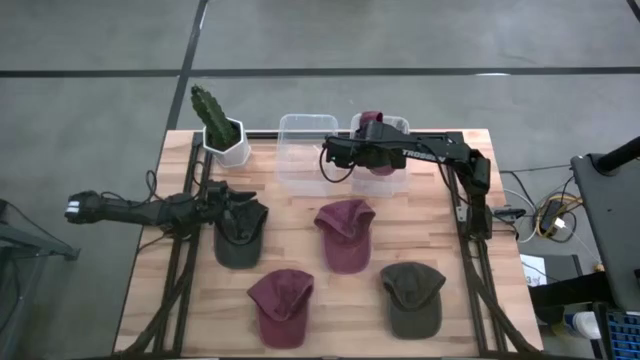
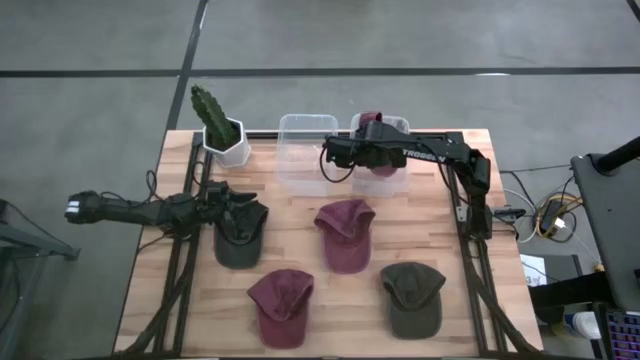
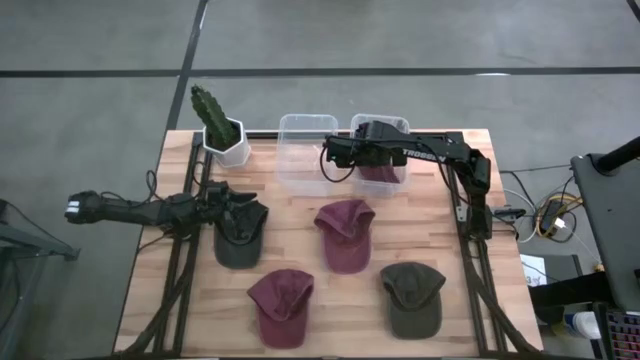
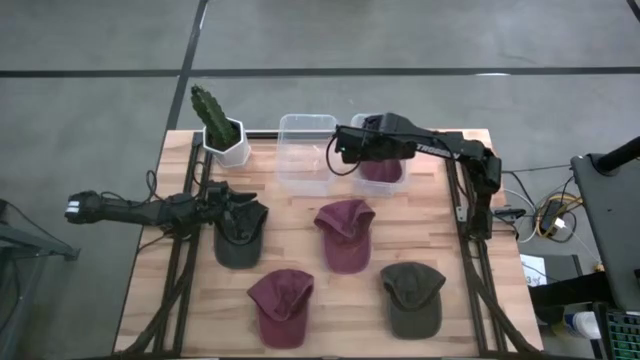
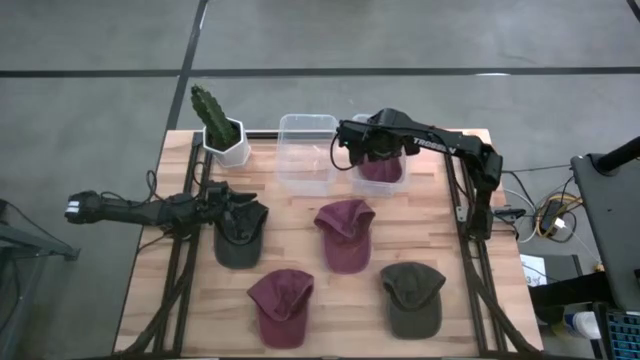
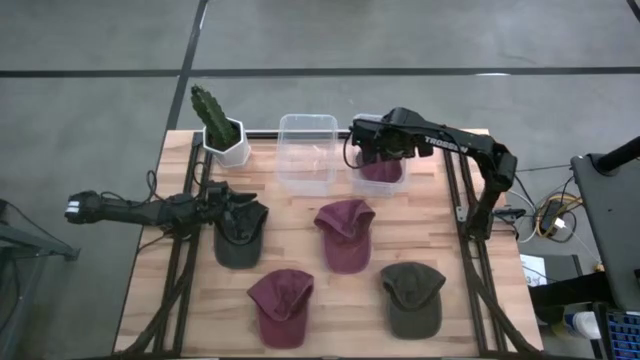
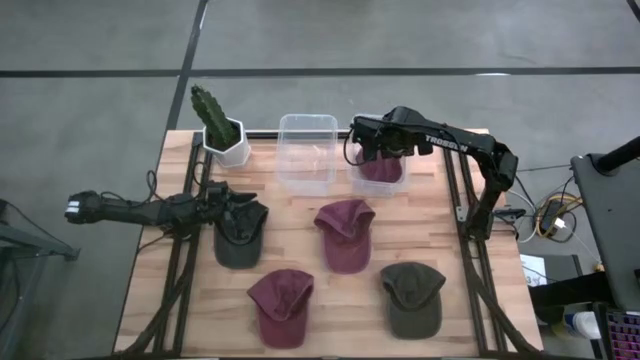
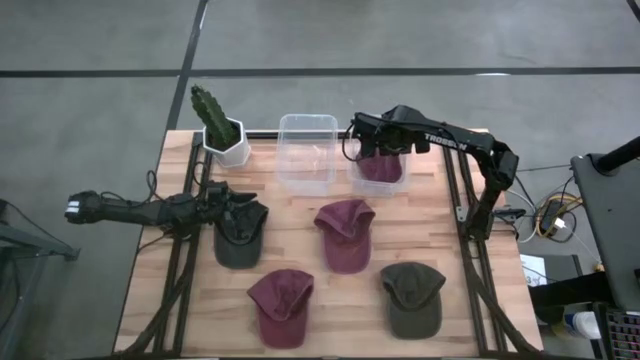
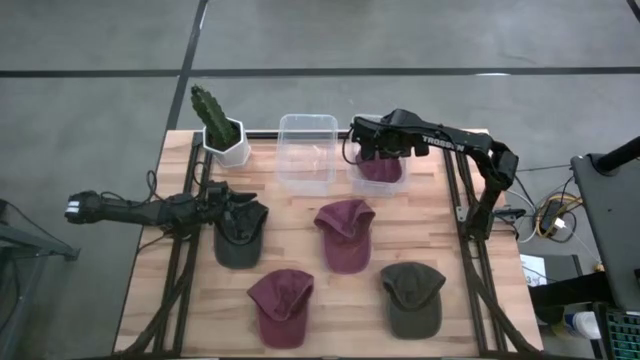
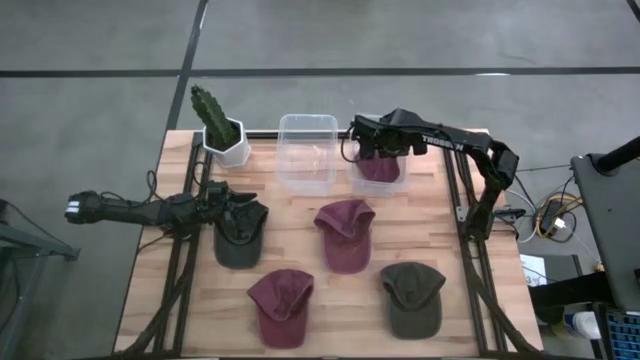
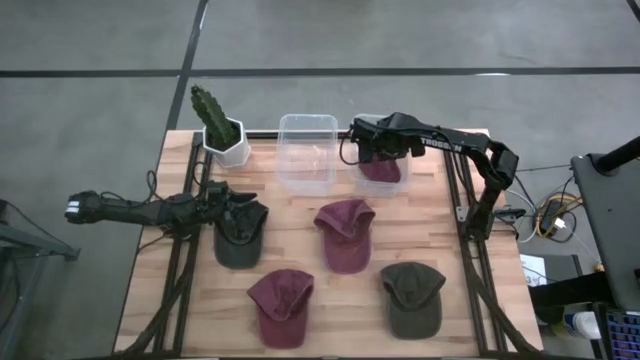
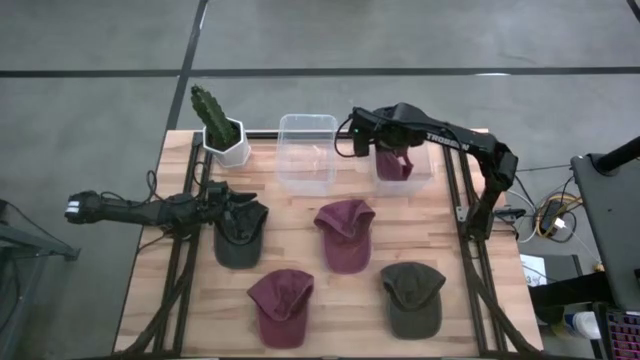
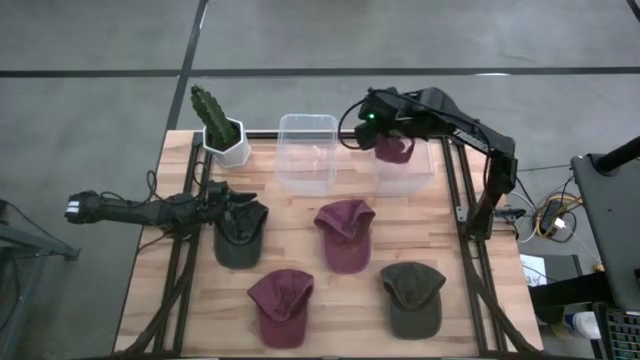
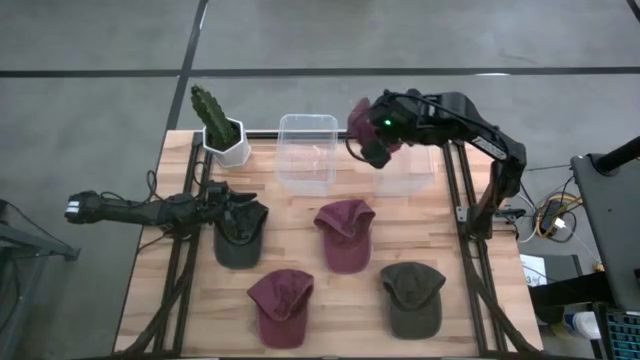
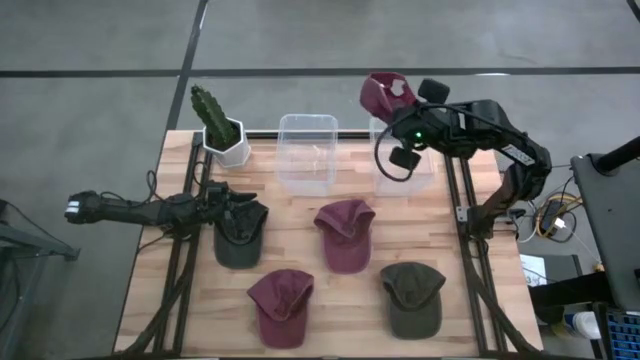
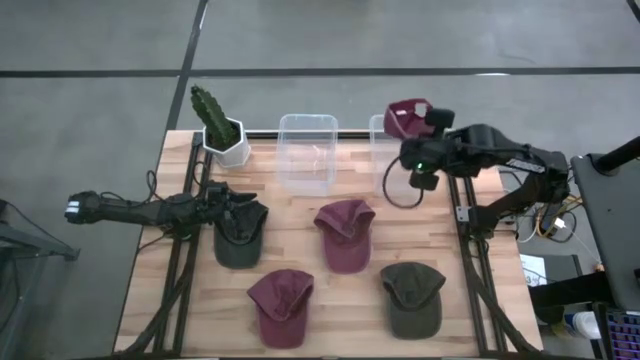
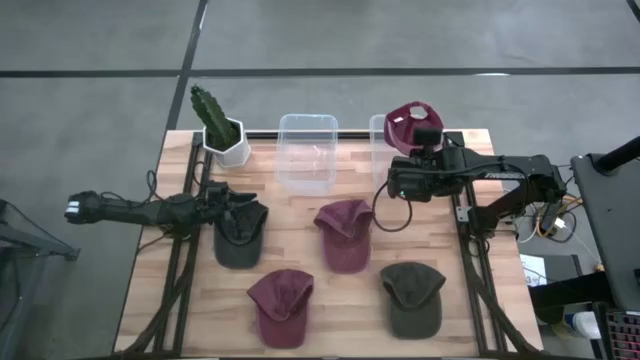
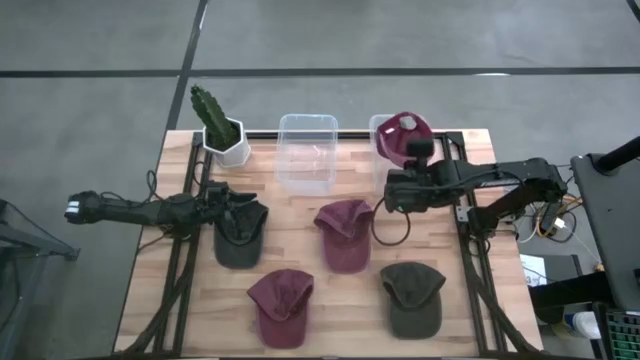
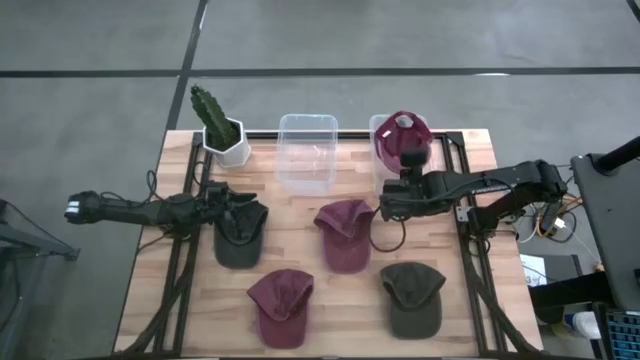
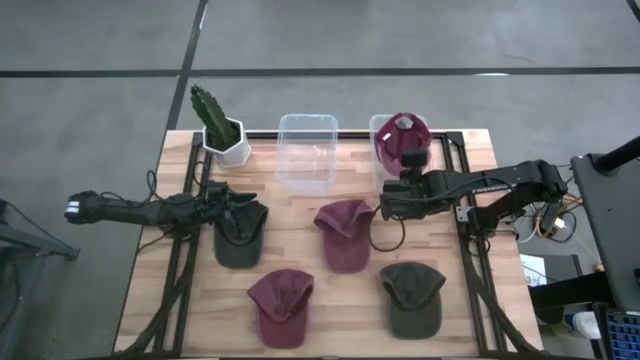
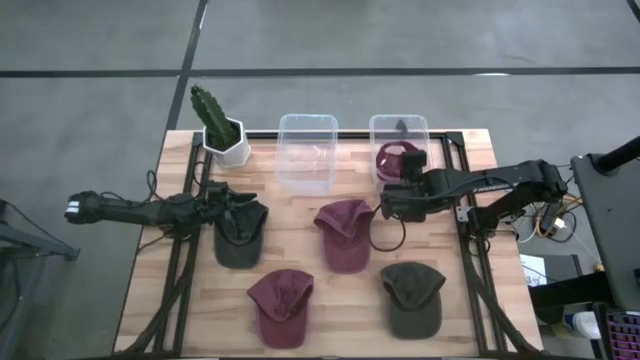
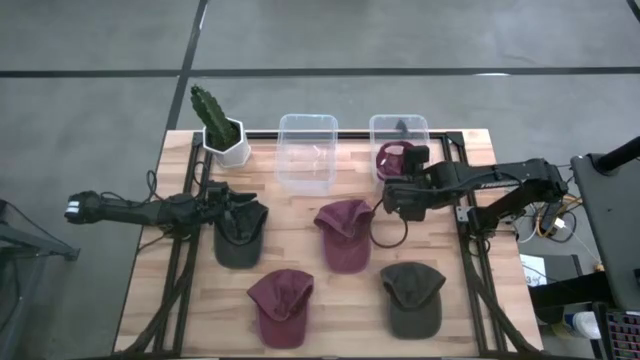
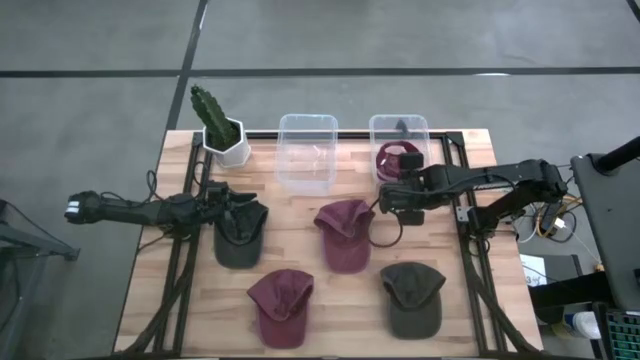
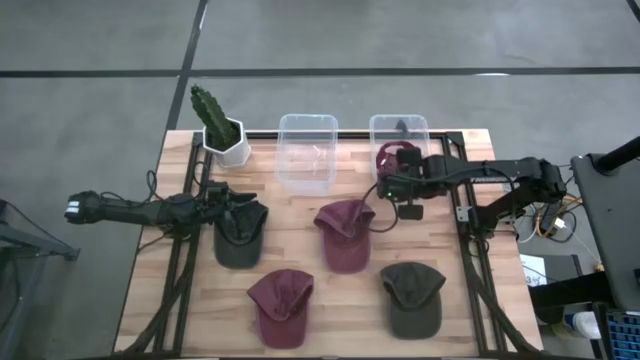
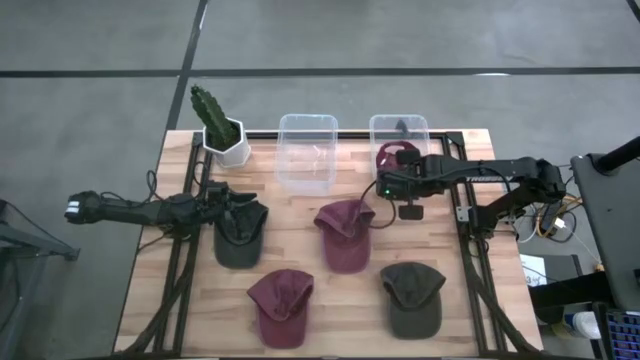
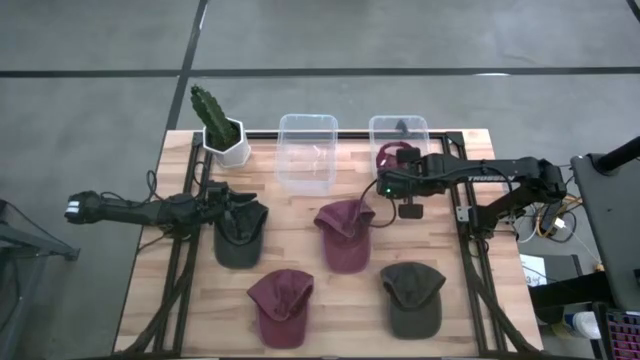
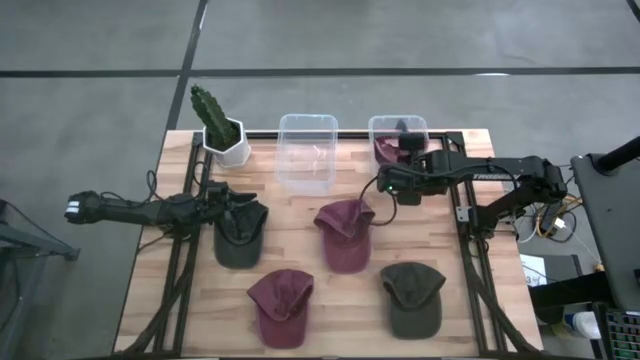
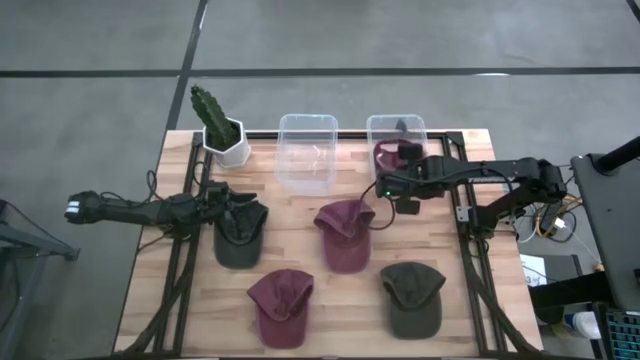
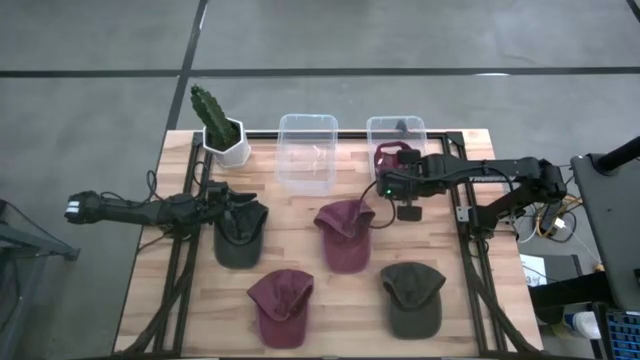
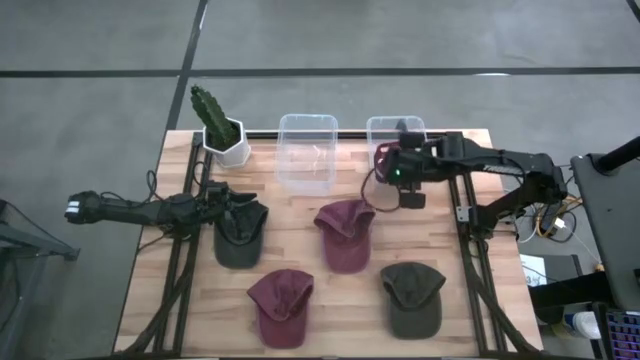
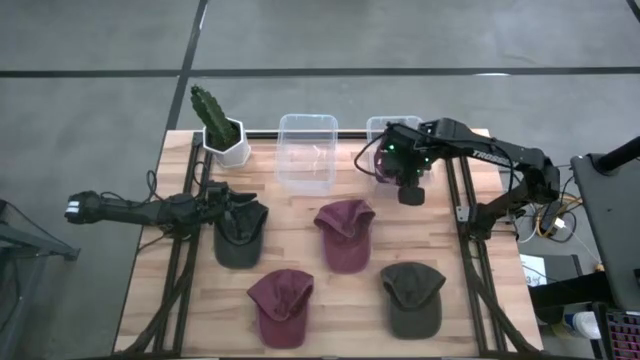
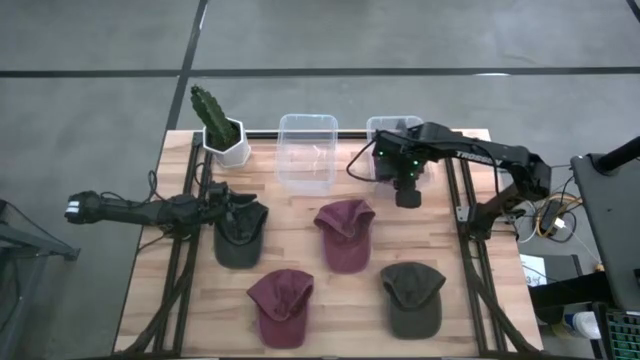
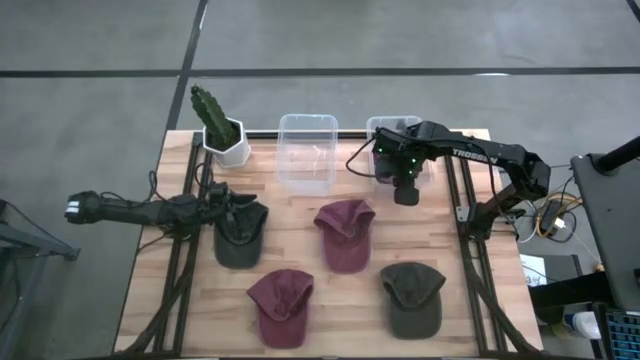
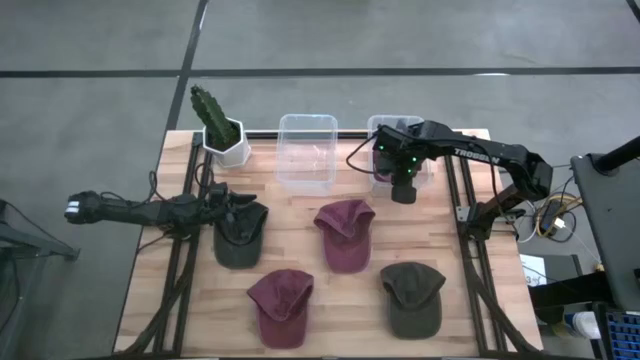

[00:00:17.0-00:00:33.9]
Task: Pick & Place hat
Put the right red cap into the right transparent bin

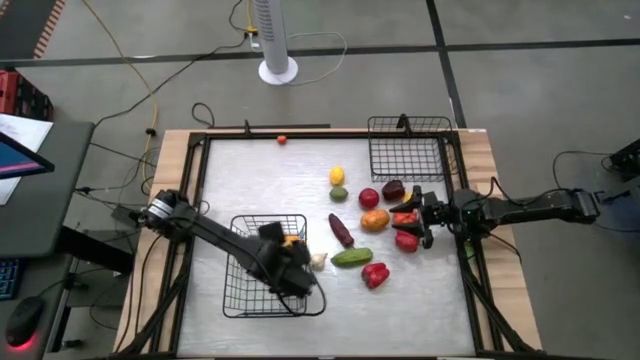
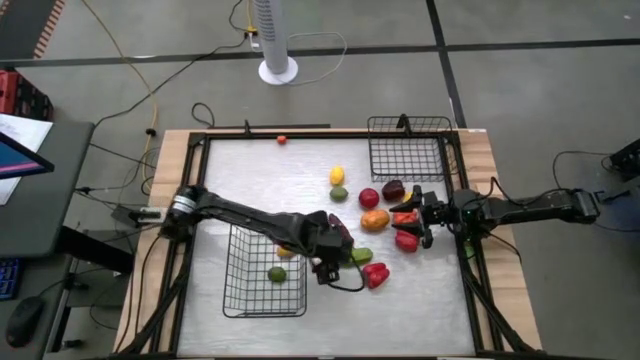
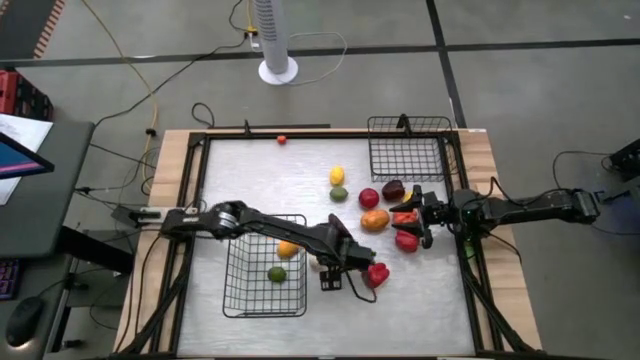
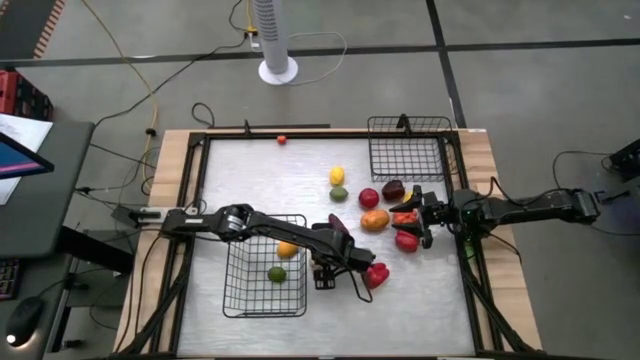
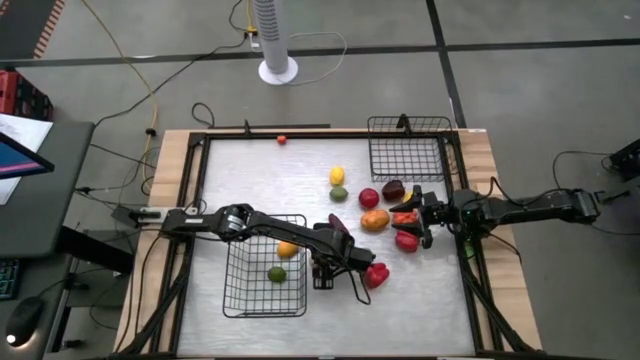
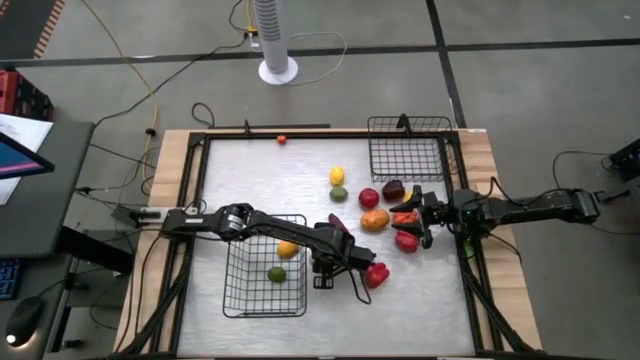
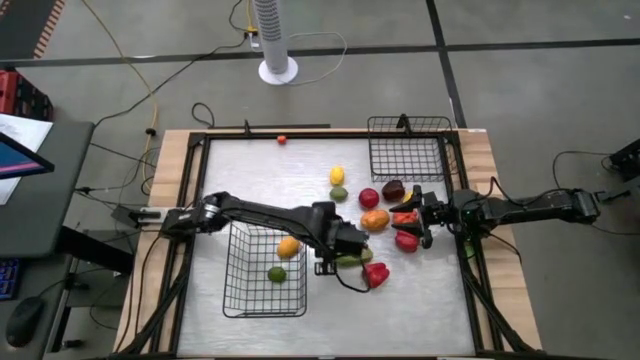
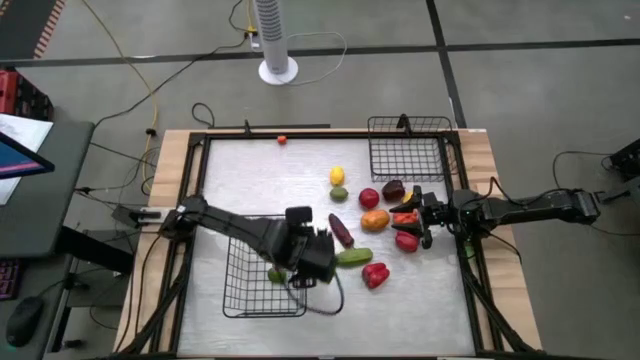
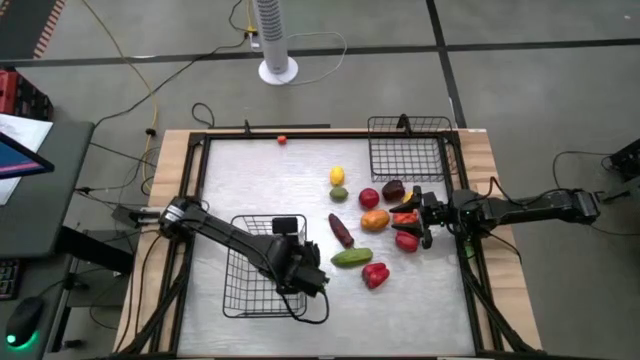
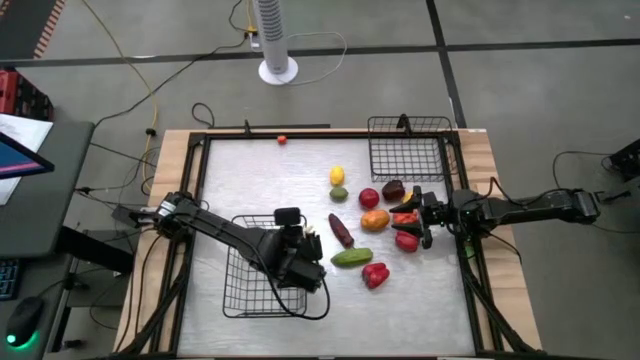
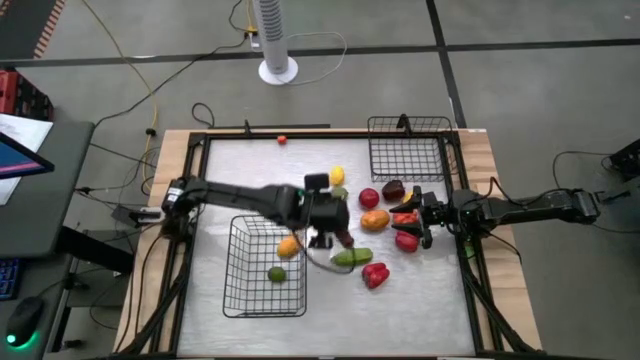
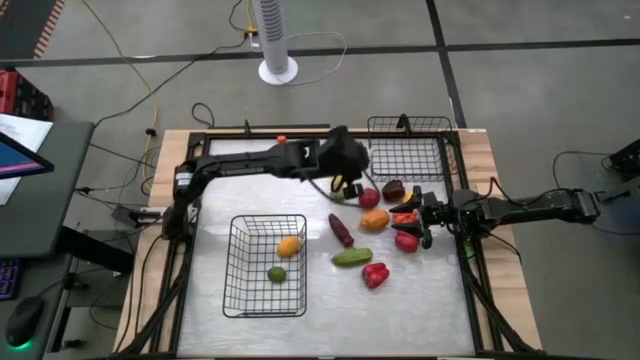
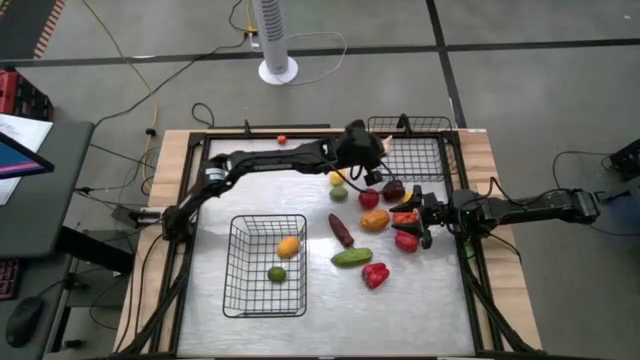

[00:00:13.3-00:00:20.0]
Task: Sort produce into baskets
Put the garlic into the top wire basket
